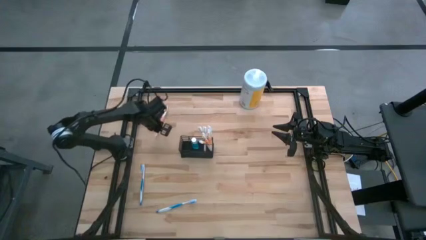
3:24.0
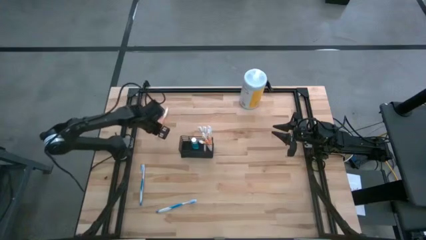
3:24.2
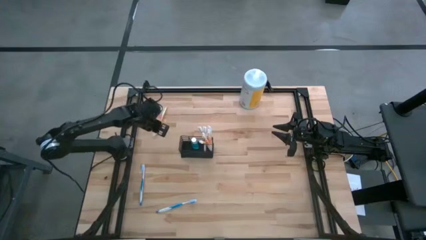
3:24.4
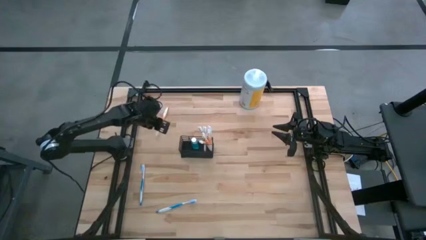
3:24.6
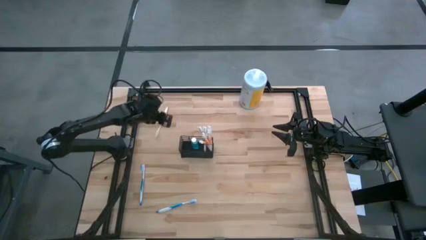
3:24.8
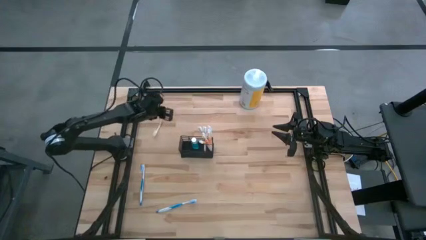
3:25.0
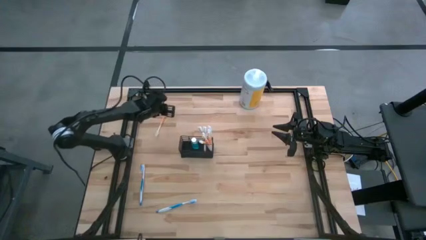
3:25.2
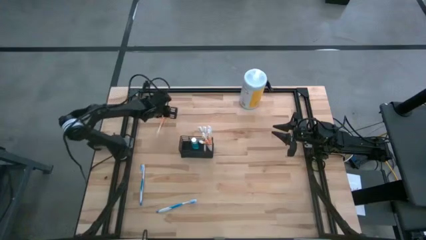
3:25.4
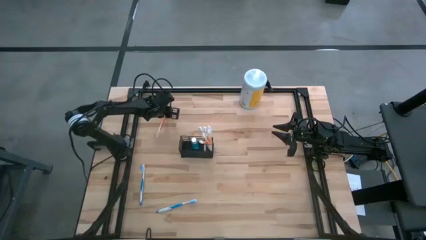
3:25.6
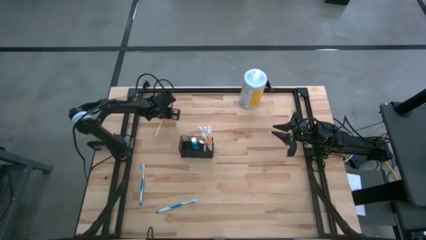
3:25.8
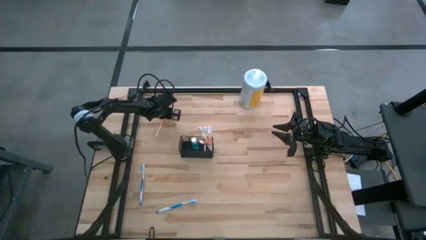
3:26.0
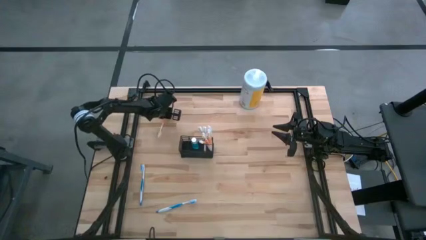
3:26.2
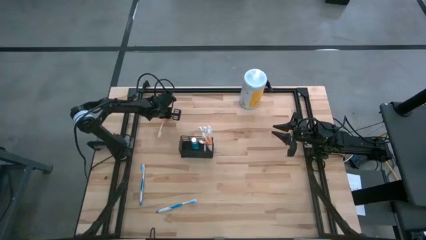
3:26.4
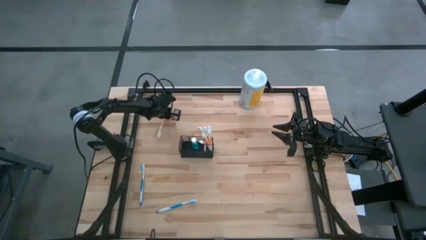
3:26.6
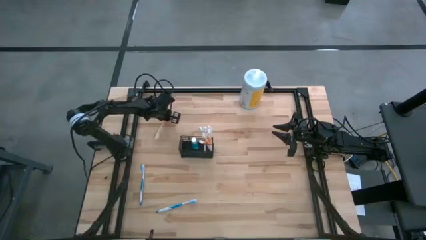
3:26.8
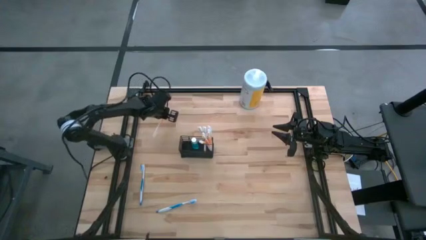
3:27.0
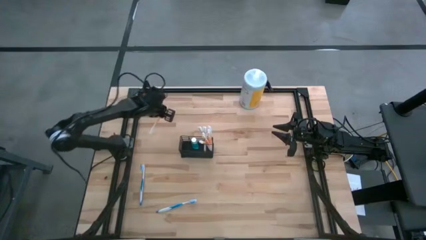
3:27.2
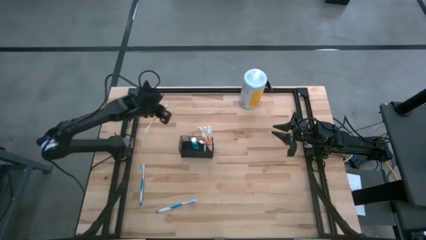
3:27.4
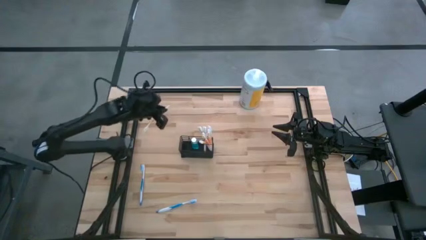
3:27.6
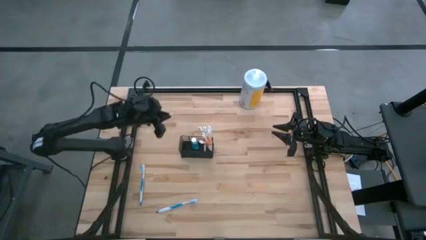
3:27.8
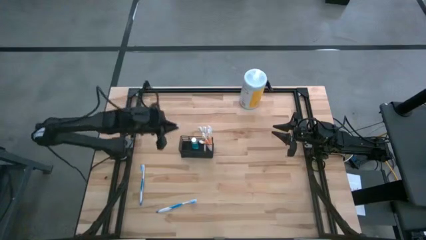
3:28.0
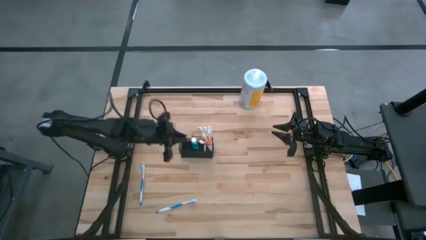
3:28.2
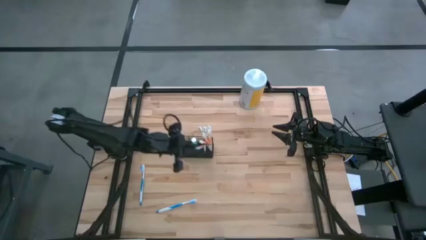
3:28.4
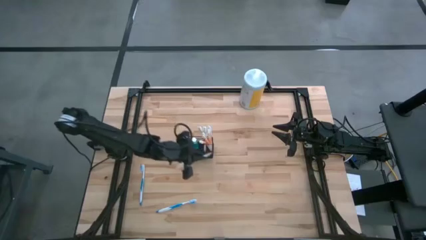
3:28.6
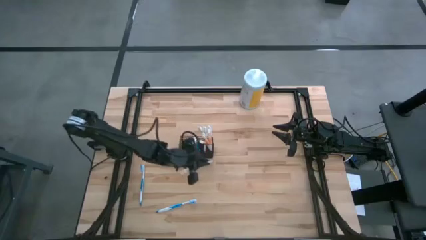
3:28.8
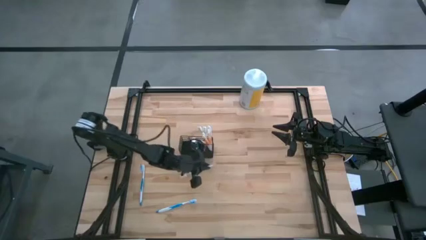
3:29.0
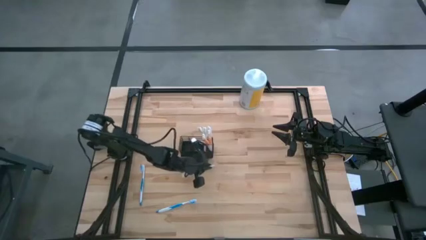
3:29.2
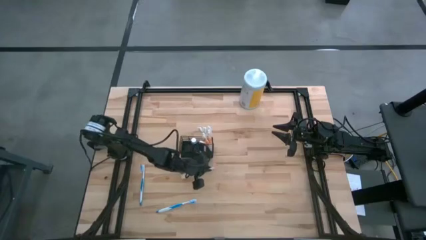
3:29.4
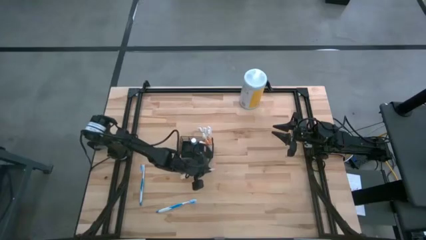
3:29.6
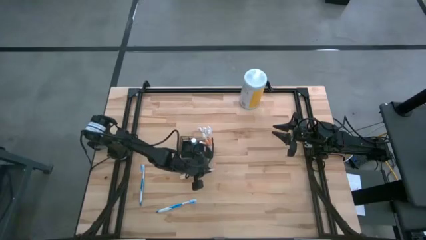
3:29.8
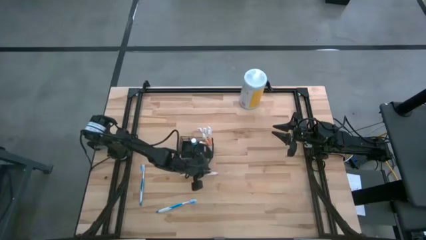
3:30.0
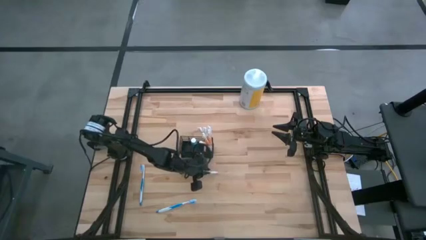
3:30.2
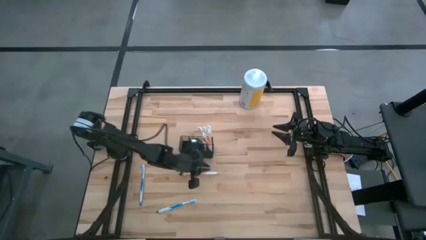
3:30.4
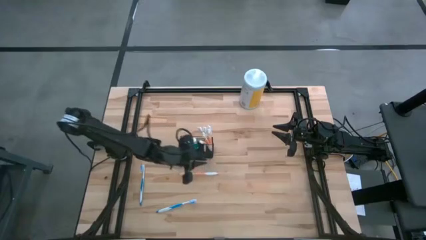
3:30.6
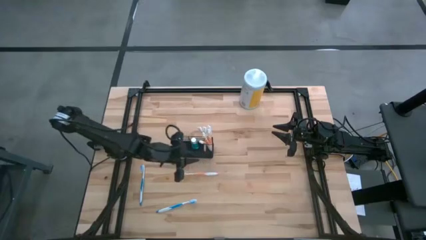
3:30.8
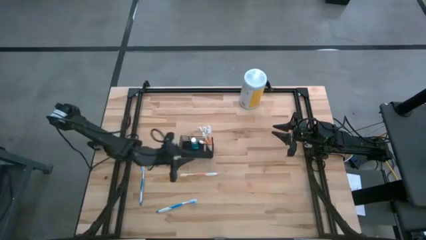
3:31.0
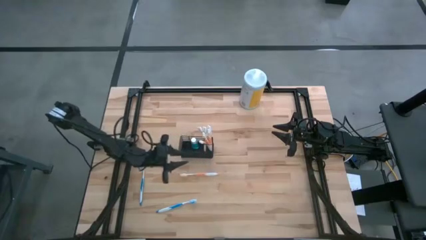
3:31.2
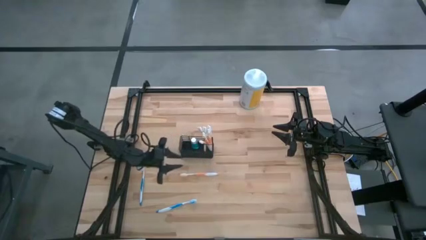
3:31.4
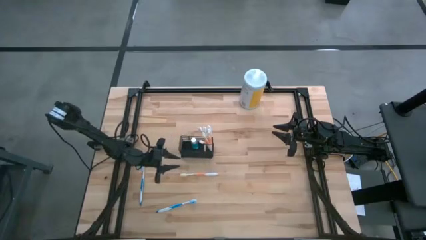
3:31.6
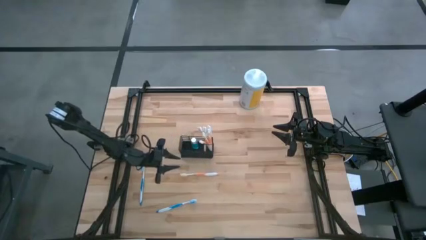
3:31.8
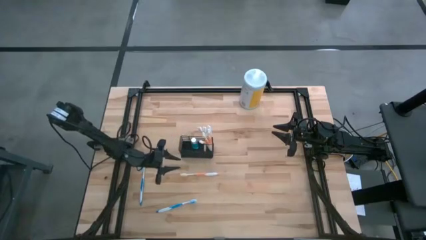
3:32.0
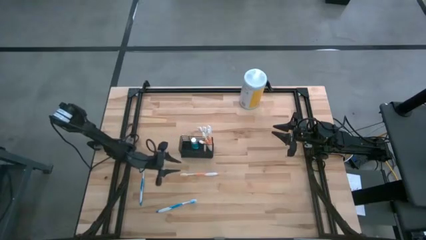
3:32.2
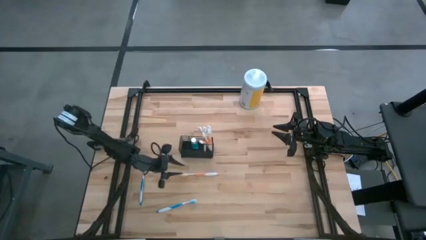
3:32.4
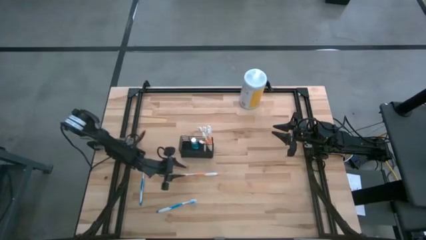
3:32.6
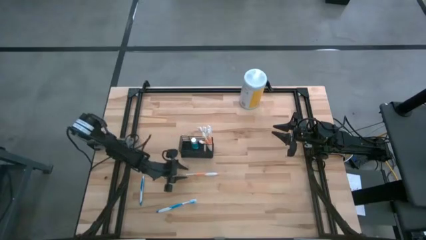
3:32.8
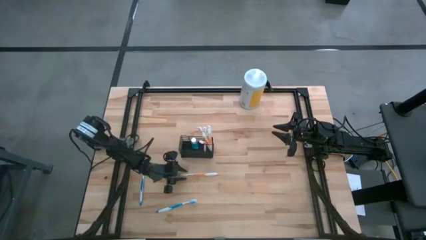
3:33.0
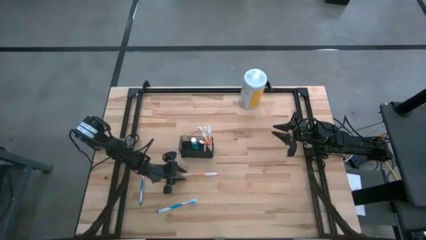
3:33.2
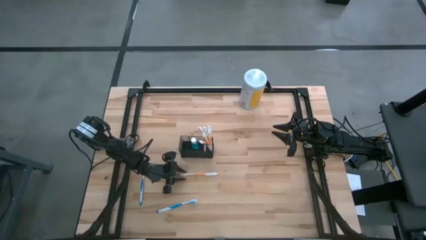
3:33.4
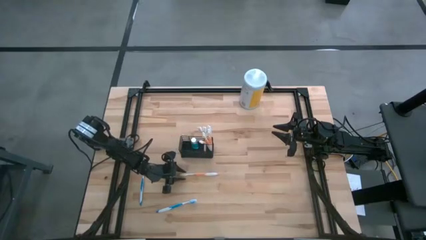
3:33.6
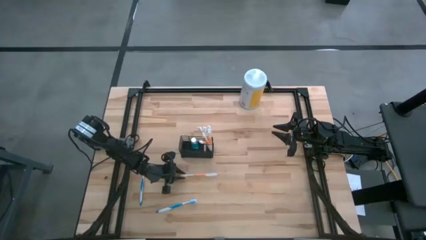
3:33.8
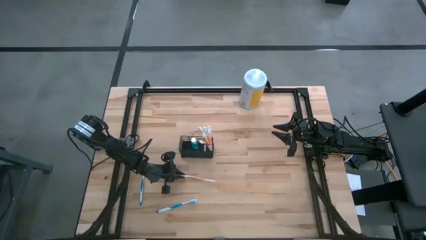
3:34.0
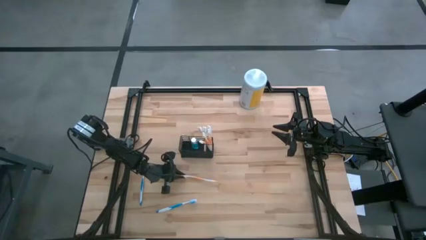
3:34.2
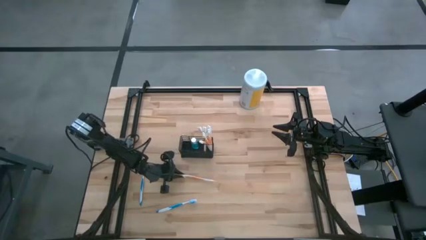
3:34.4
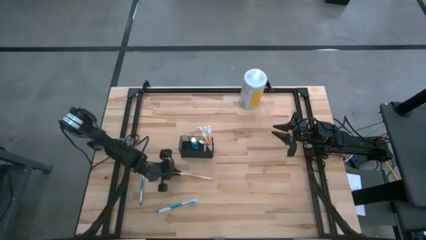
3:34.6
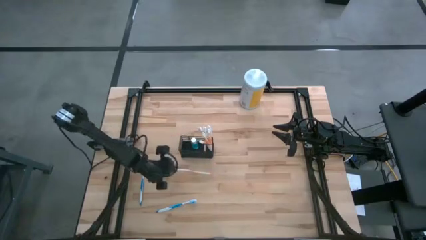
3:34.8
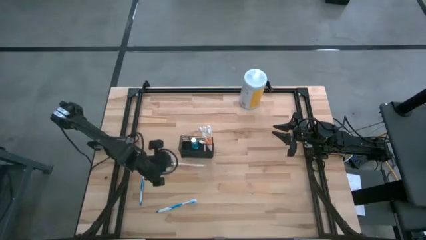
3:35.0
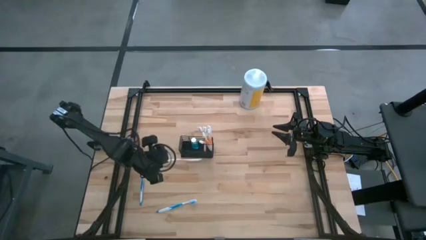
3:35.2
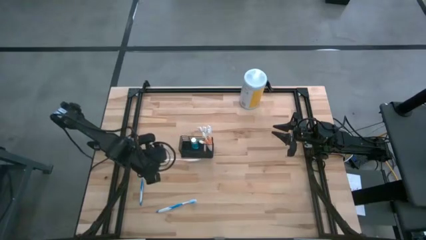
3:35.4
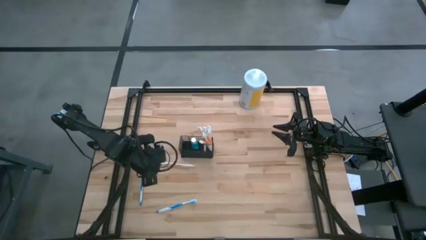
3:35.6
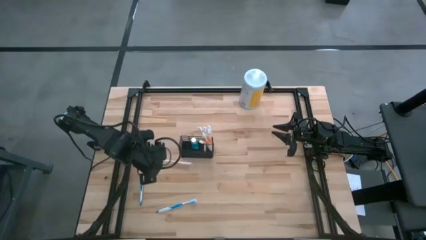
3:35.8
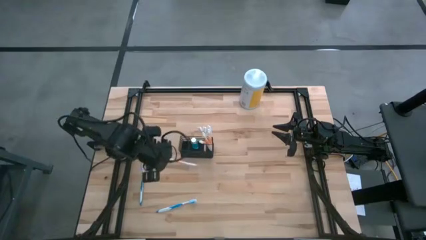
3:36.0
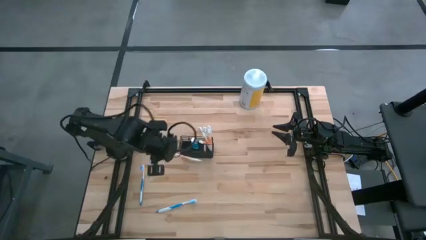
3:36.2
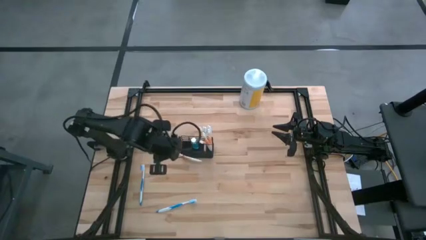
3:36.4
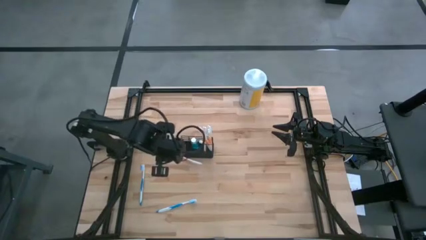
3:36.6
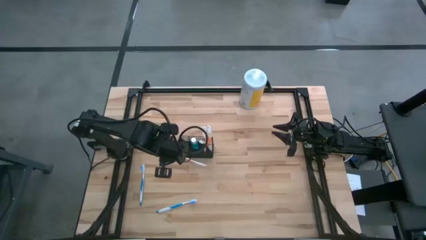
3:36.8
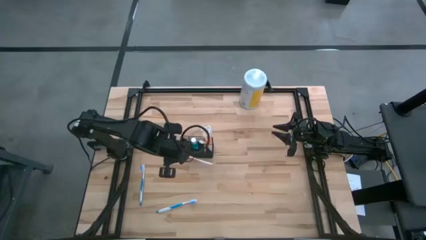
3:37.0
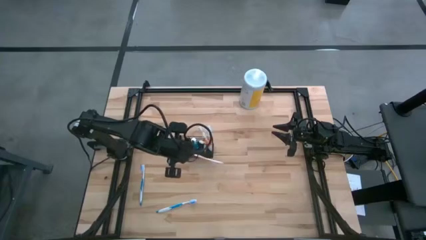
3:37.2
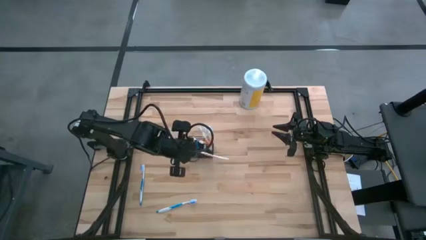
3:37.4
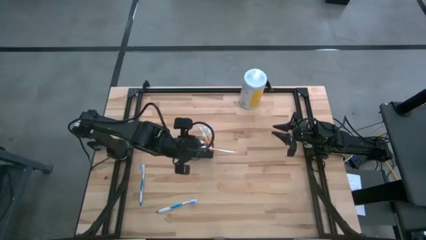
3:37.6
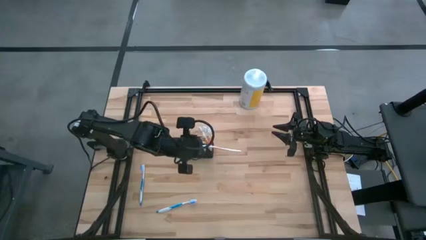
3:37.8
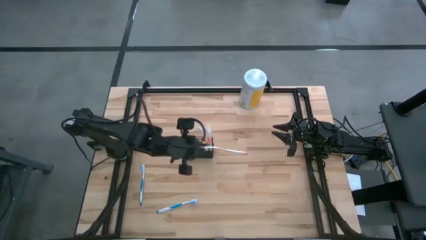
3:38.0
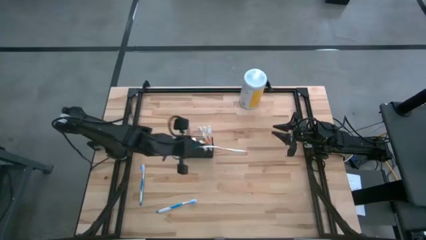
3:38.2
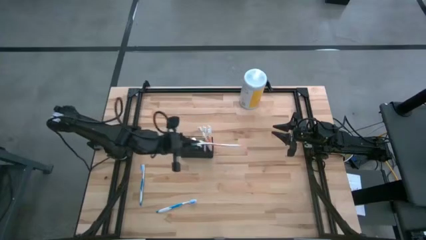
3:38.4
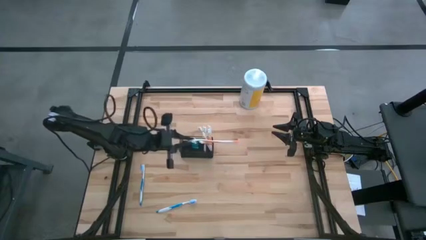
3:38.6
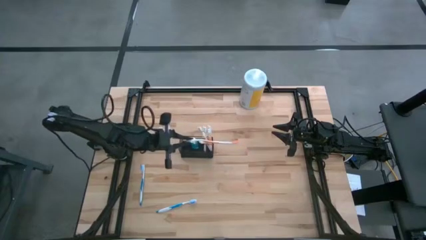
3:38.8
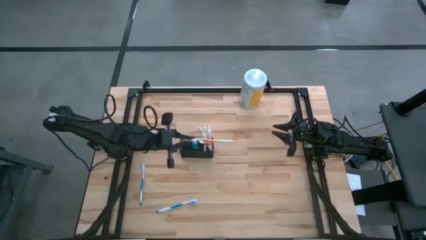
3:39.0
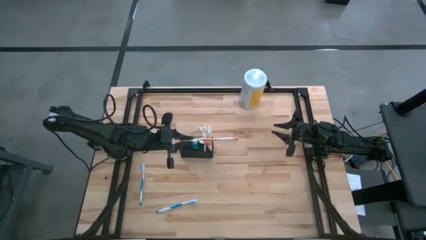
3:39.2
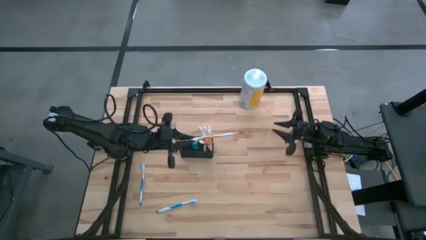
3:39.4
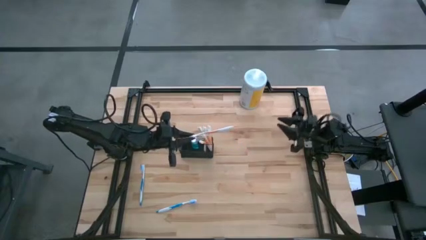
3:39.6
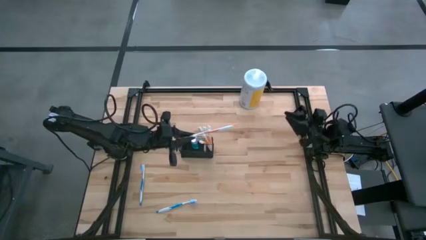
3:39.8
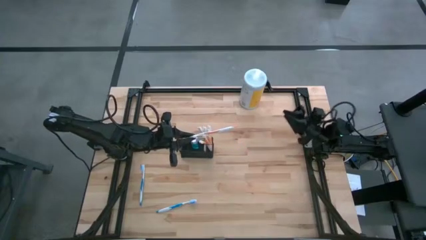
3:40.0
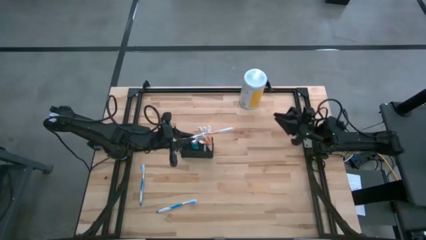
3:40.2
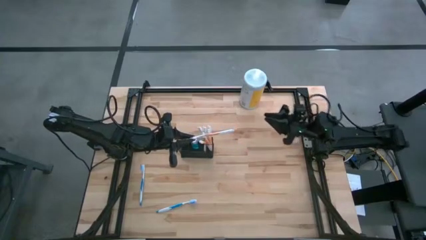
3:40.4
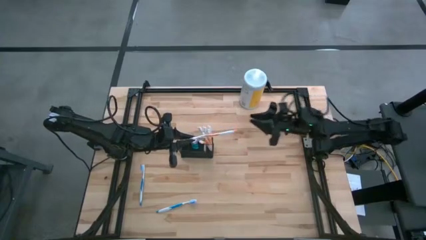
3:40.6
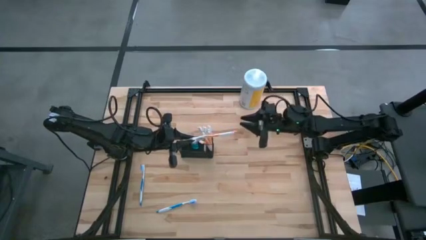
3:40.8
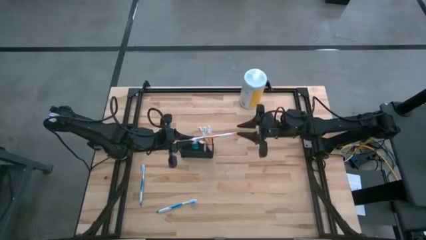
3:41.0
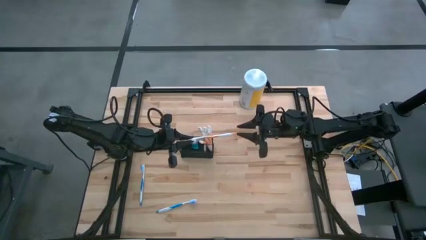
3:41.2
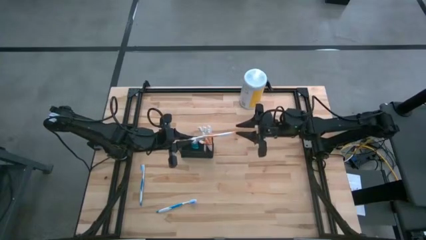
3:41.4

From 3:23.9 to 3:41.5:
Task: Pick & Place toothbrushing station
Put the orange toothbrush into the right section of the wire organizer
